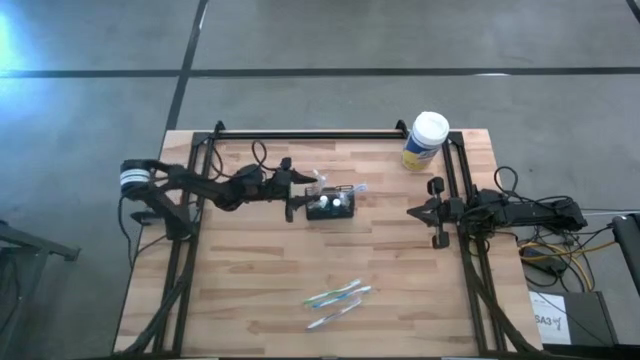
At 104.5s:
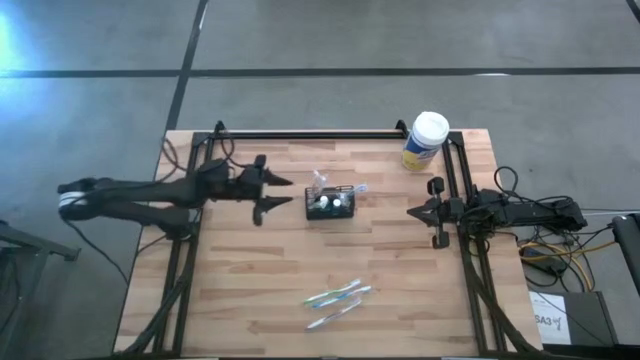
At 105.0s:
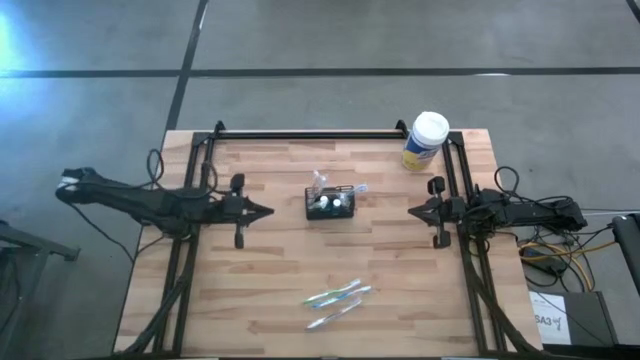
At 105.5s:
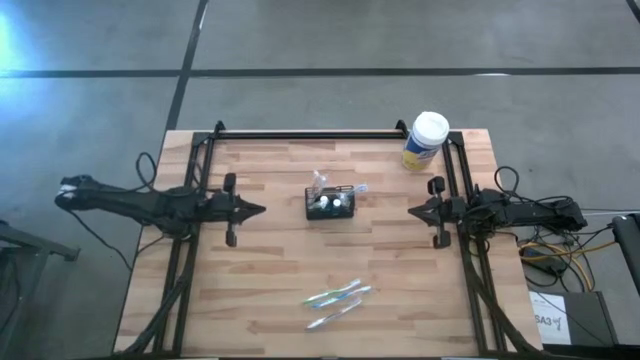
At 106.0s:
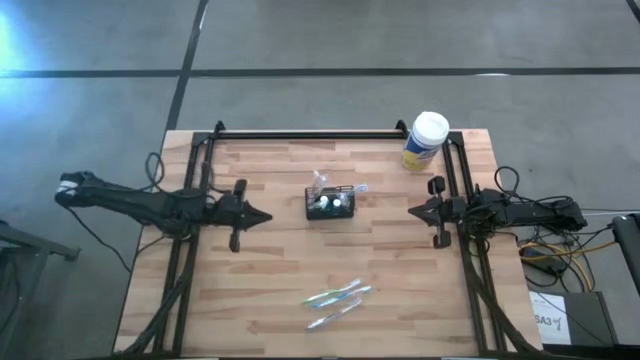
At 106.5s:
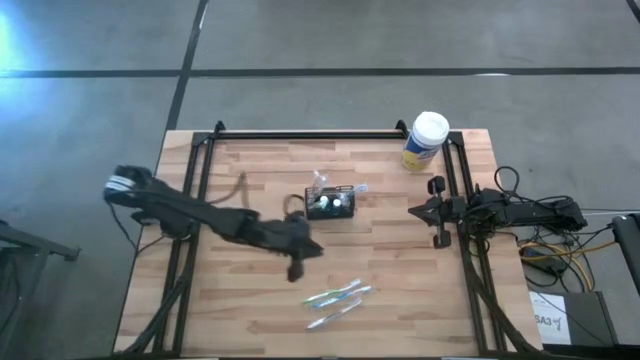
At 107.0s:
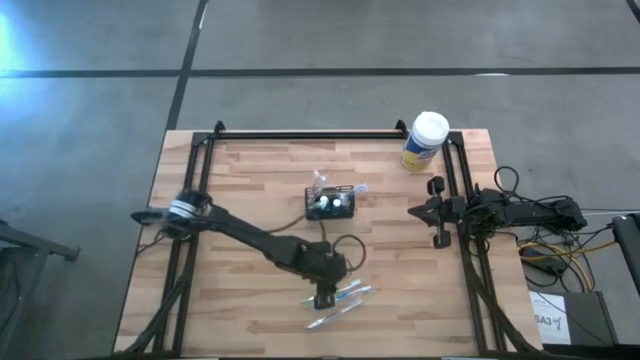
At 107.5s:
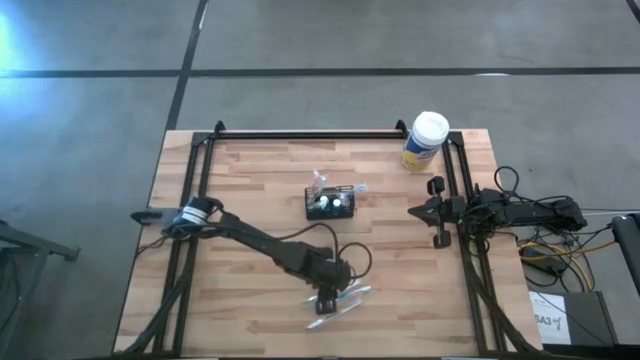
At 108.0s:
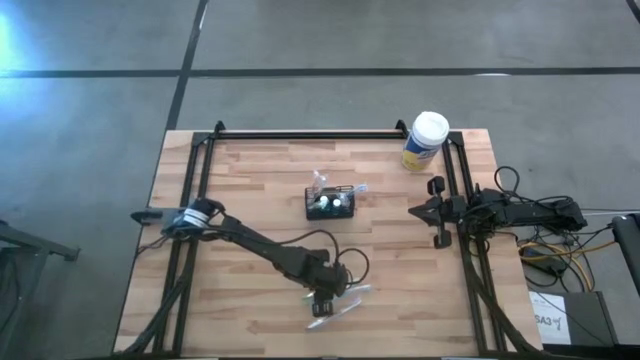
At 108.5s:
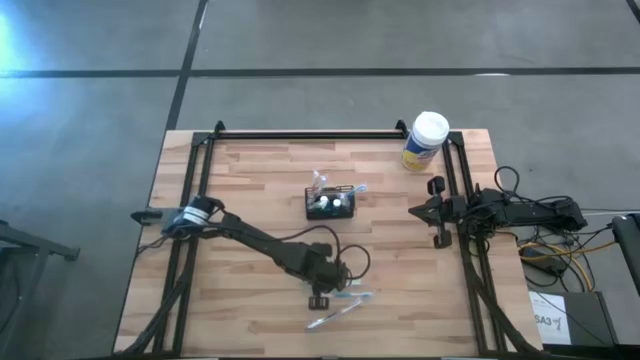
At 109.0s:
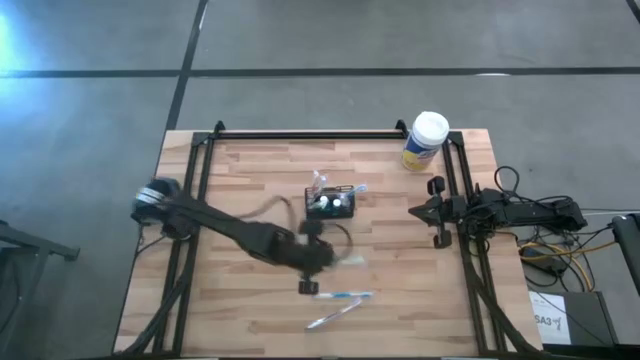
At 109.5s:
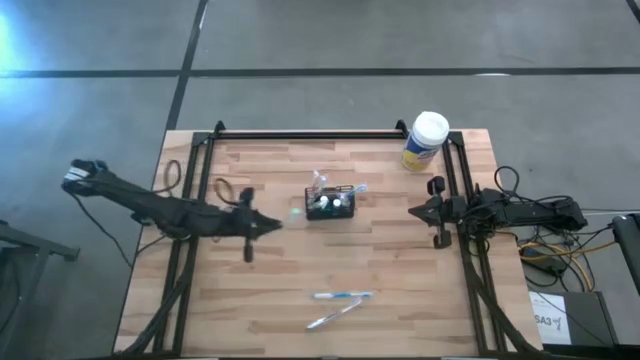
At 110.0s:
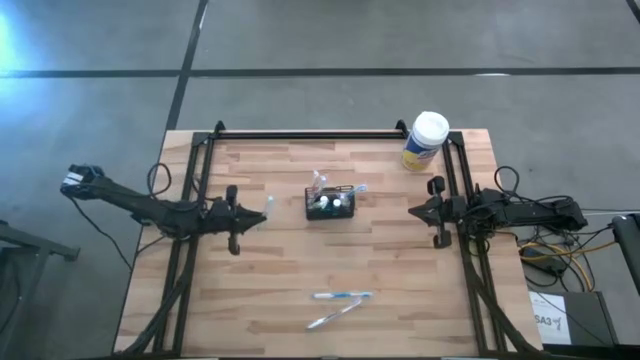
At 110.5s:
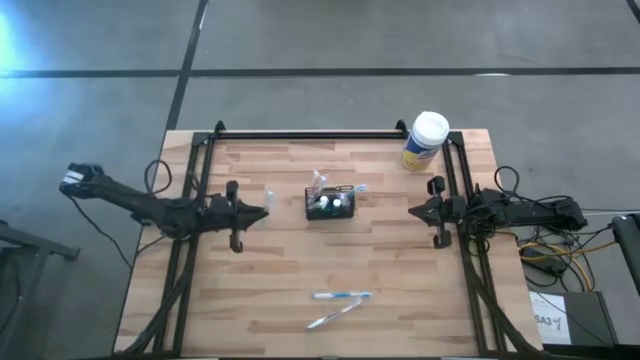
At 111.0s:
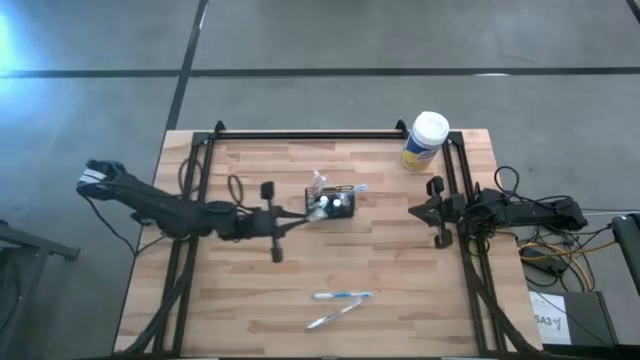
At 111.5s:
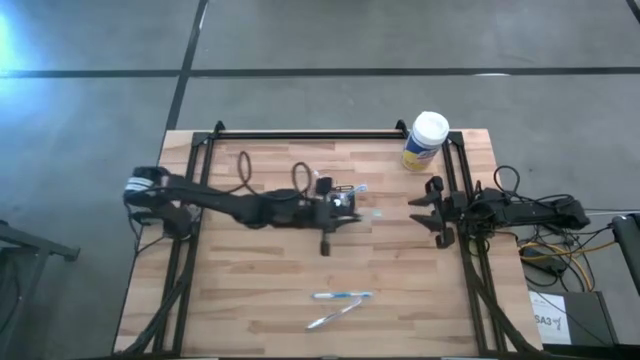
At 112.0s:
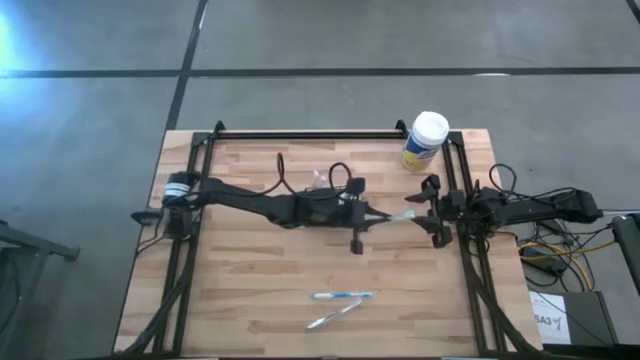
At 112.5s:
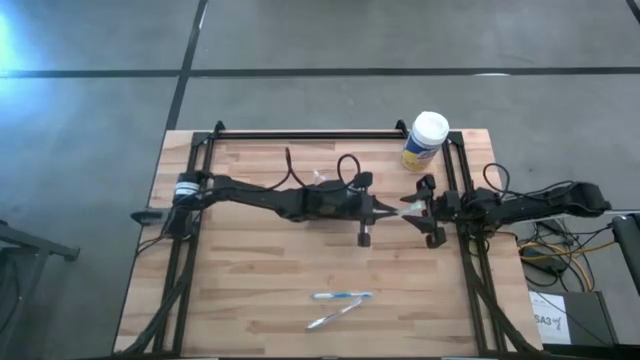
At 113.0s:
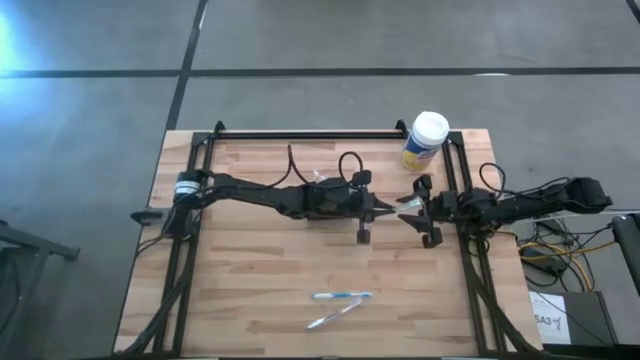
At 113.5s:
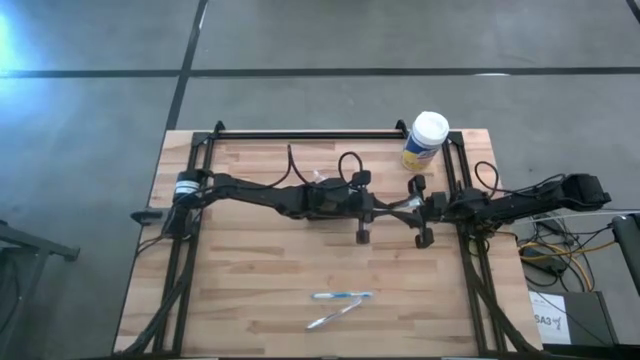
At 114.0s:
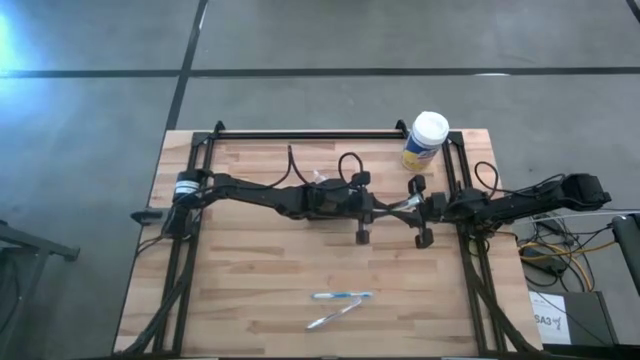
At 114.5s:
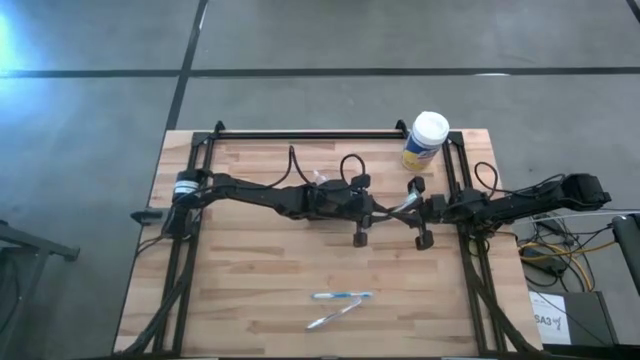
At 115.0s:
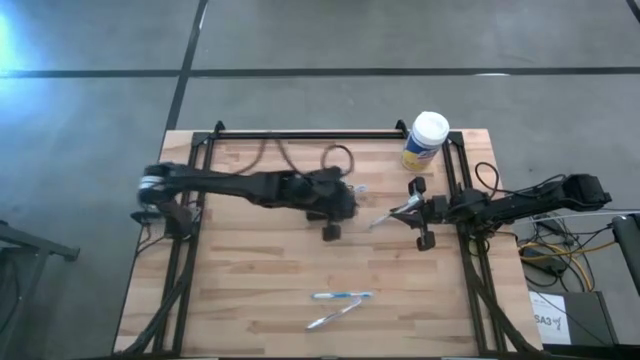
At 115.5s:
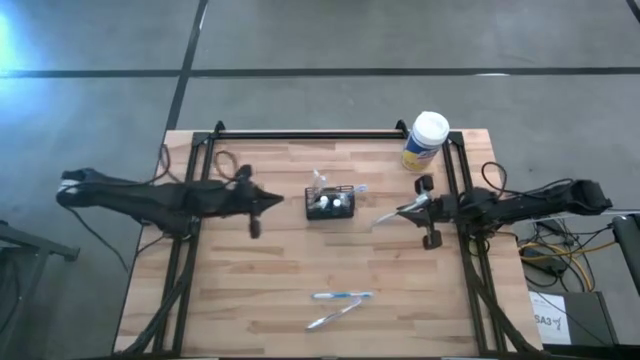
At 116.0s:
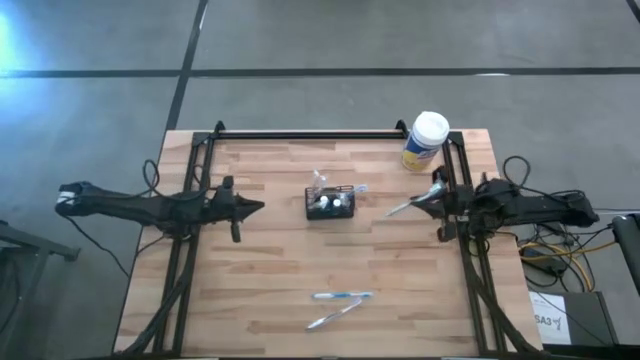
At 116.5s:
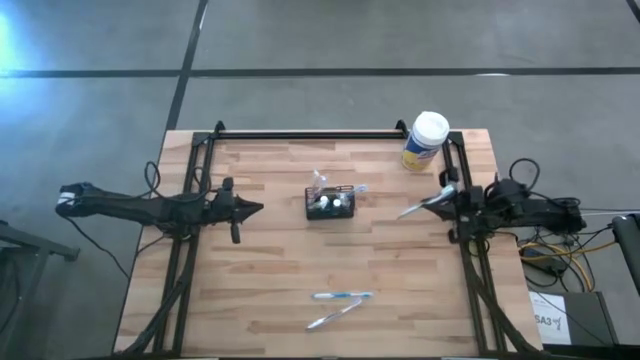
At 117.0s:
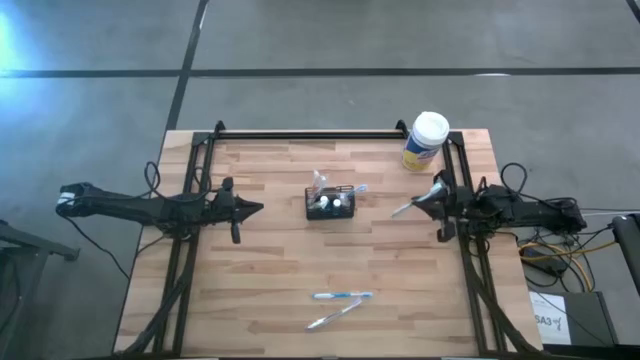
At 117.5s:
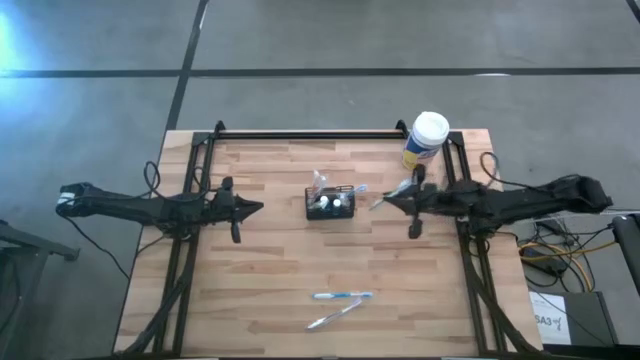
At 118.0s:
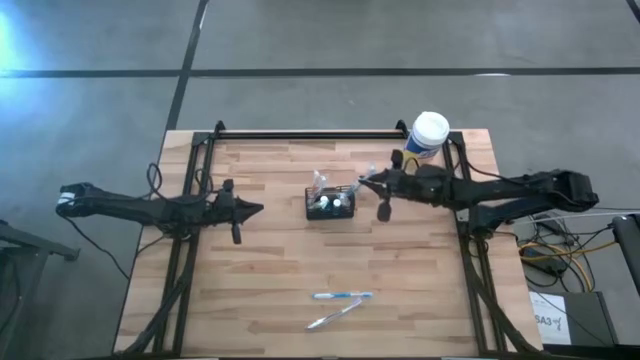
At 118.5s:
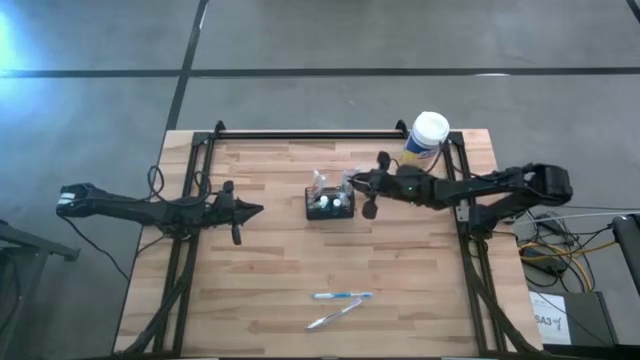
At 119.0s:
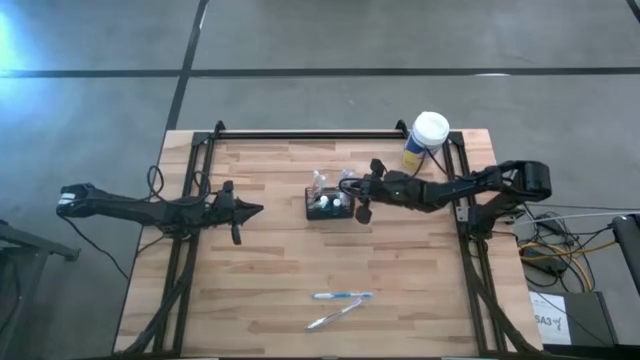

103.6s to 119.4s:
Task: Pick & Place toothbrushing station
Put the green toothbrush in the wire organizer

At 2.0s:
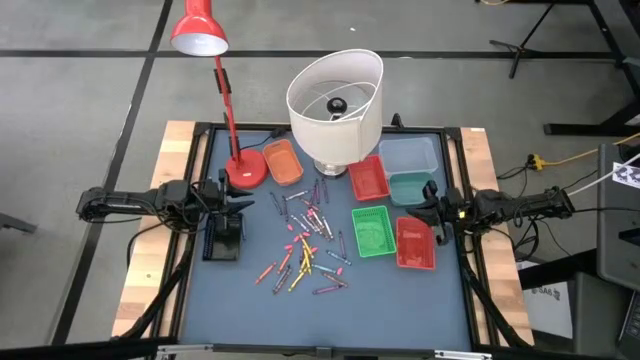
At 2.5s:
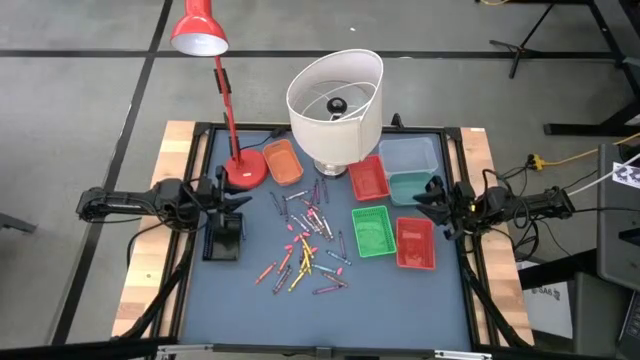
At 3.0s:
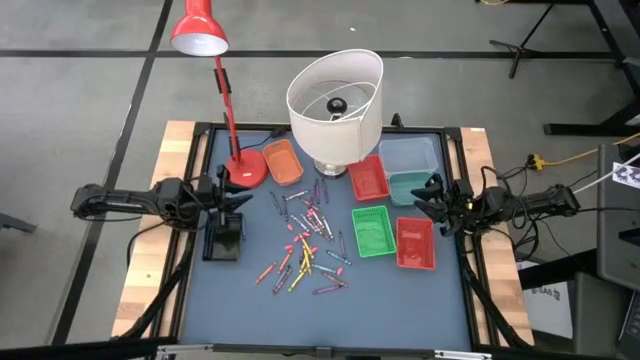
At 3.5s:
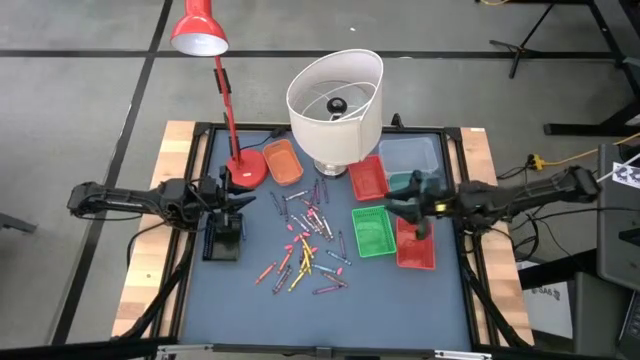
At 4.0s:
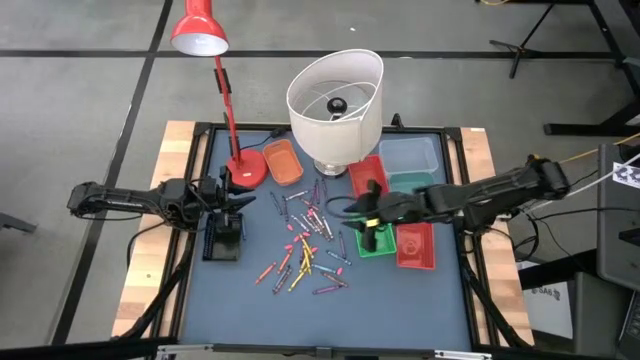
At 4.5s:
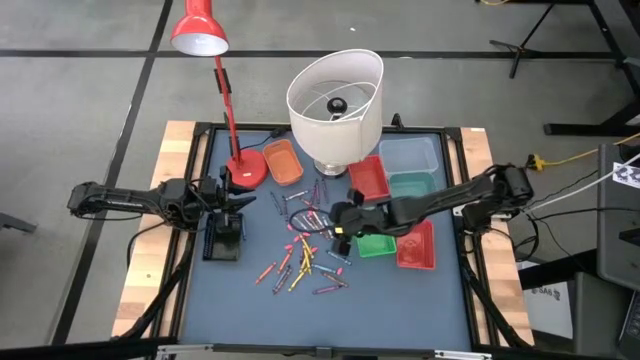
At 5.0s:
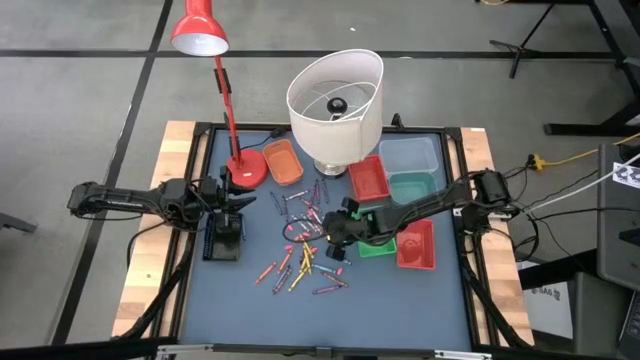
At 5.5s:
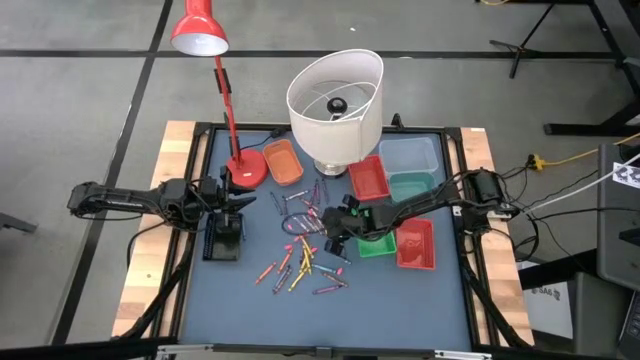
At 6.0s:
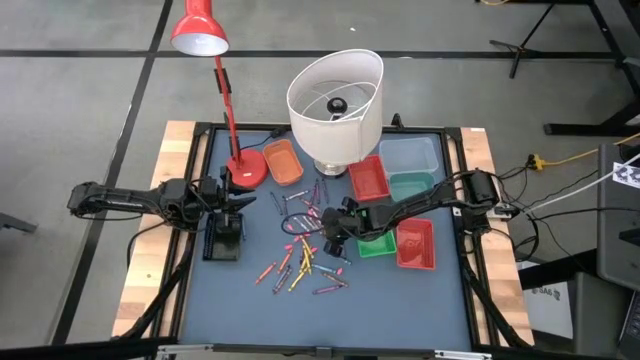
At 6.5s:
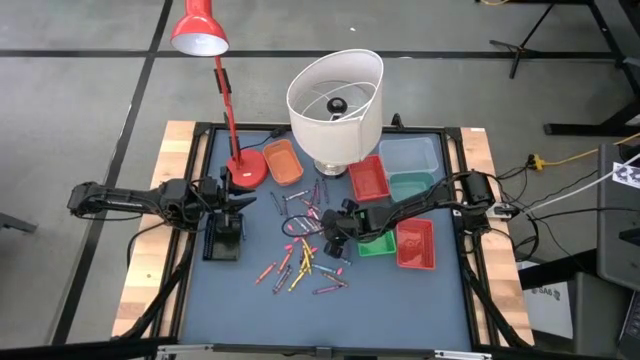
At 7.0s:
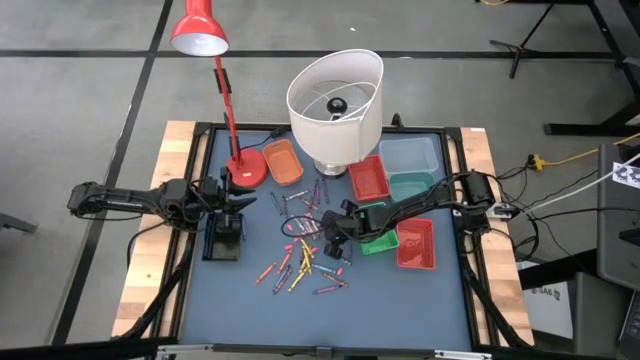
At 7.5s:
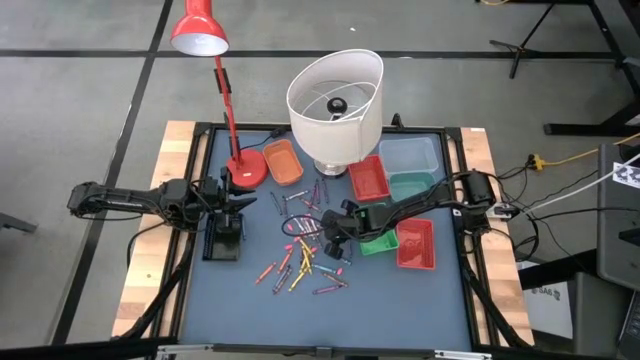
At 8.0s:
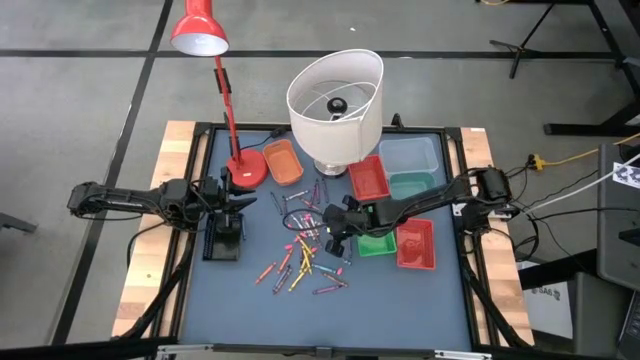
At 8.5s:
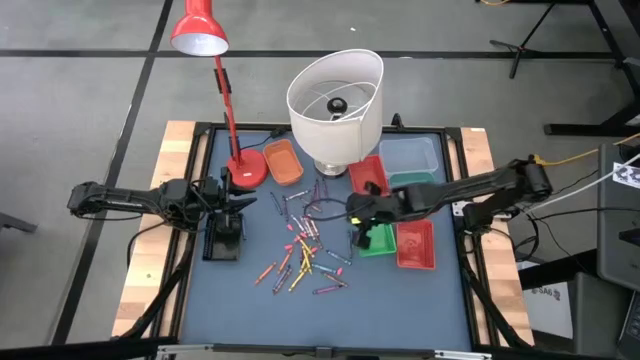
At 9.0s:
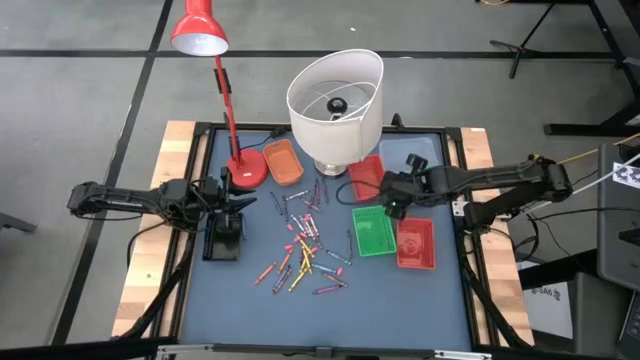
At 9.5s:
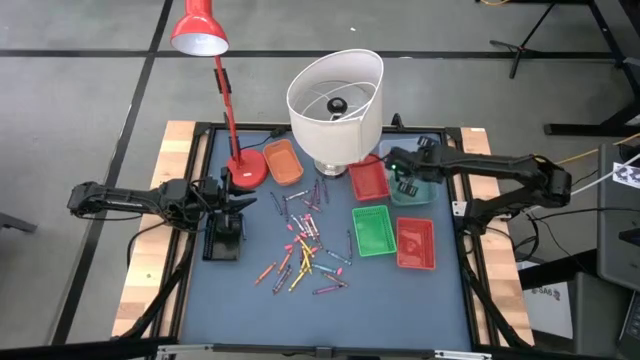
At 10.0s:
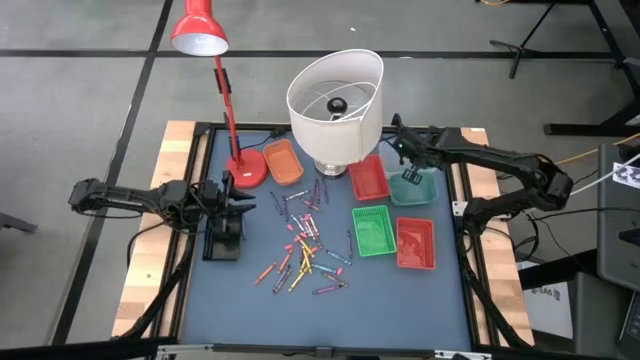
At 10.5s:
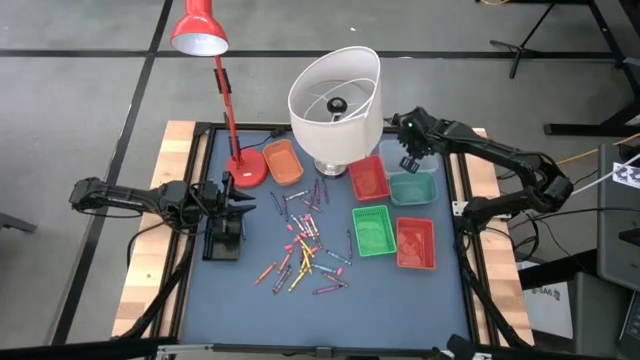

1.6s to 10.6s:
Task: Sort crayons
Put the gray crayon into the transparent bin
